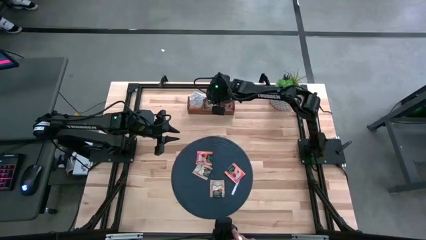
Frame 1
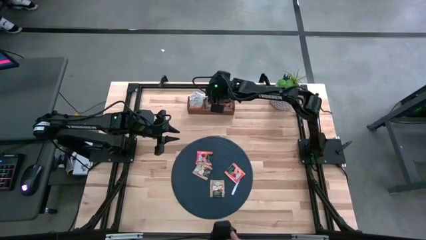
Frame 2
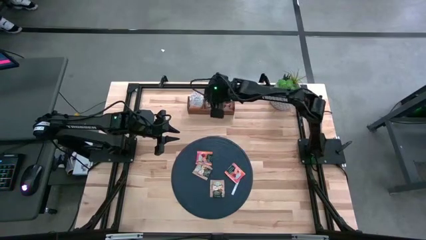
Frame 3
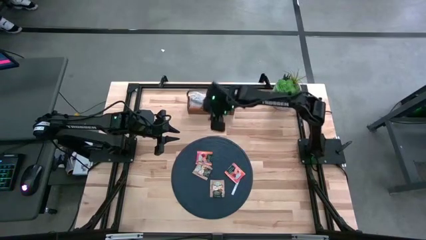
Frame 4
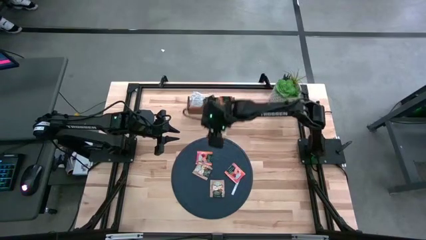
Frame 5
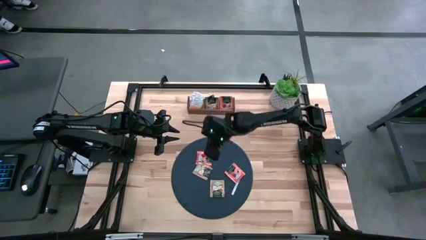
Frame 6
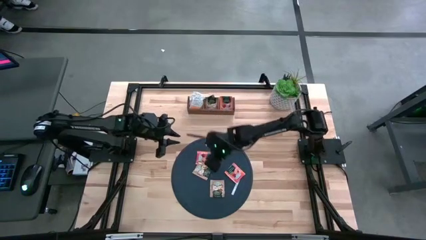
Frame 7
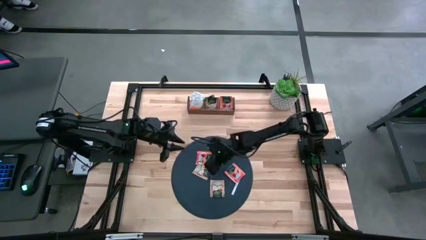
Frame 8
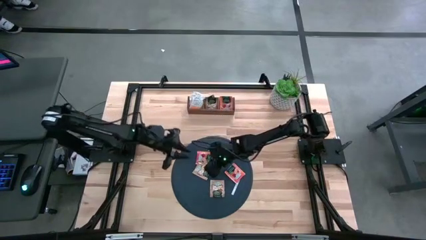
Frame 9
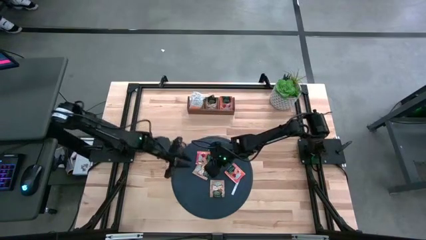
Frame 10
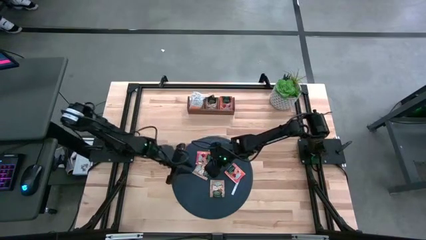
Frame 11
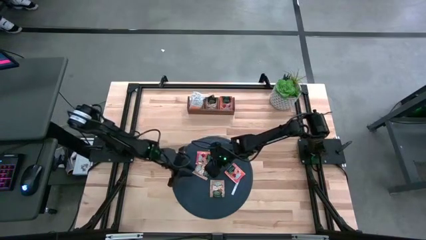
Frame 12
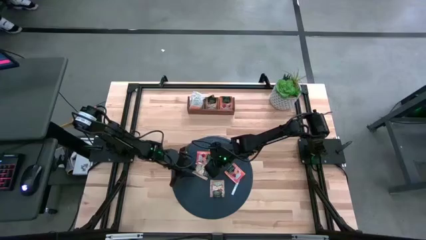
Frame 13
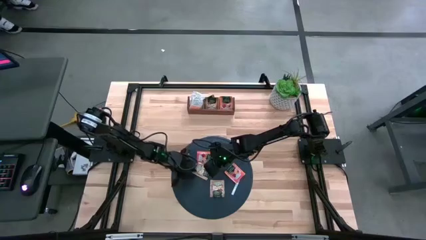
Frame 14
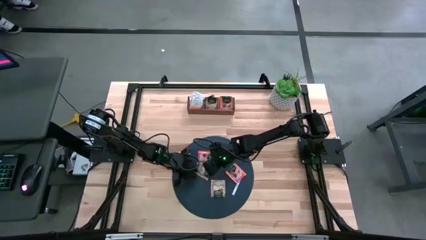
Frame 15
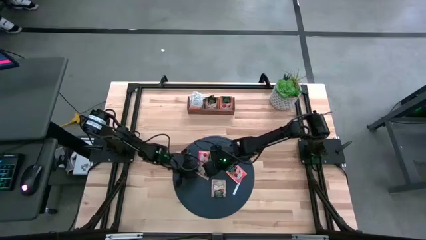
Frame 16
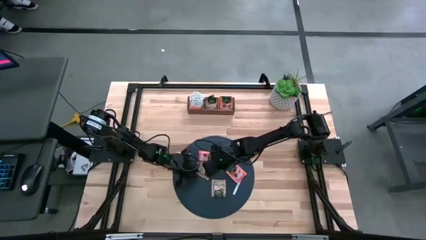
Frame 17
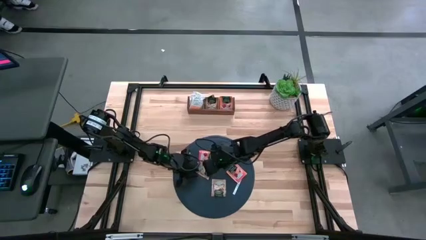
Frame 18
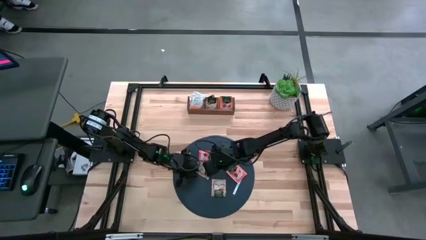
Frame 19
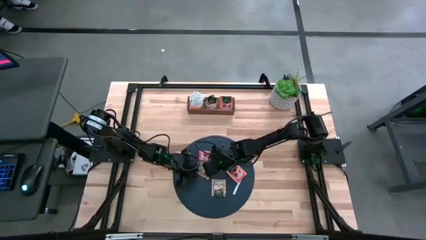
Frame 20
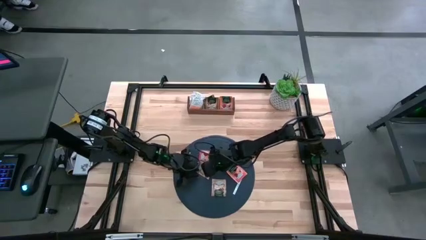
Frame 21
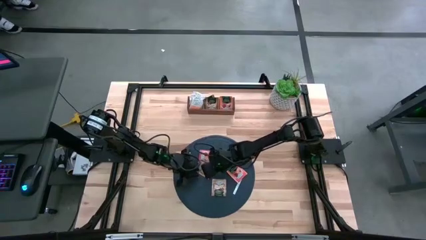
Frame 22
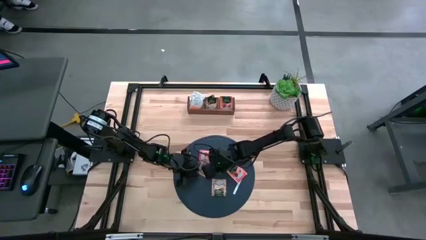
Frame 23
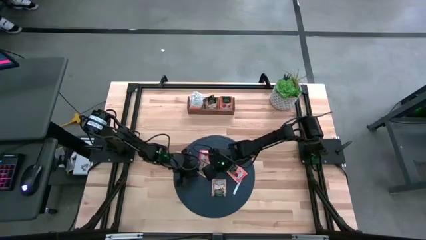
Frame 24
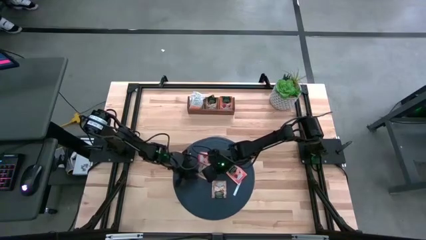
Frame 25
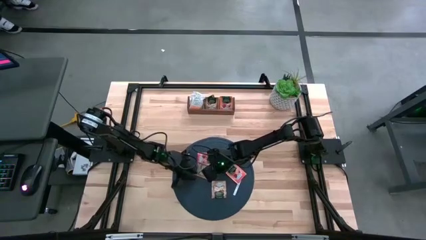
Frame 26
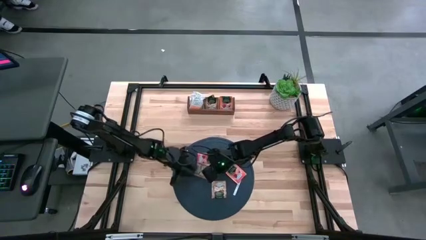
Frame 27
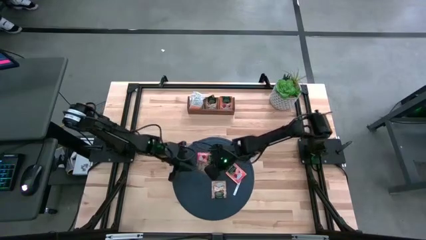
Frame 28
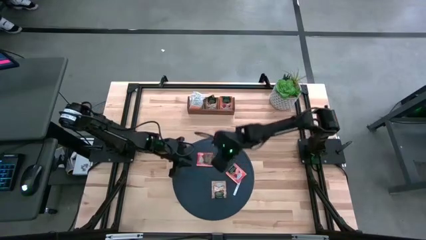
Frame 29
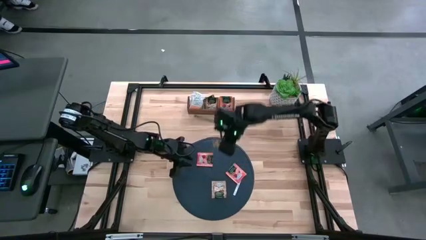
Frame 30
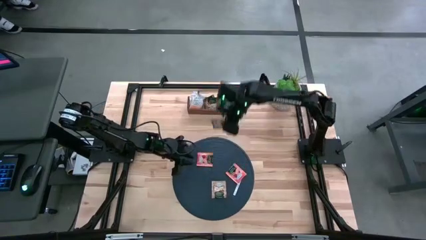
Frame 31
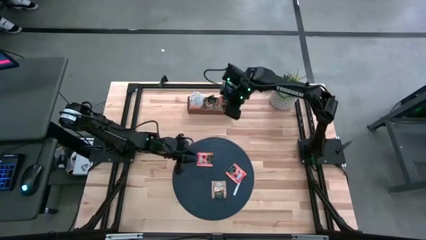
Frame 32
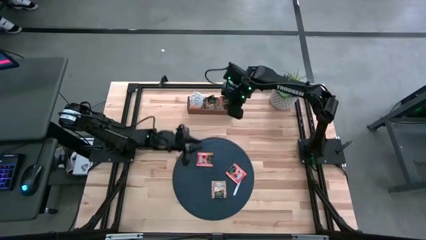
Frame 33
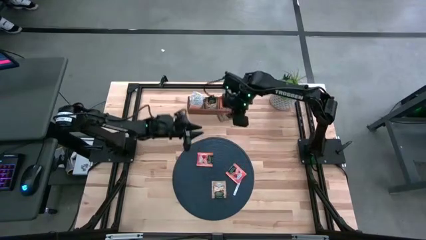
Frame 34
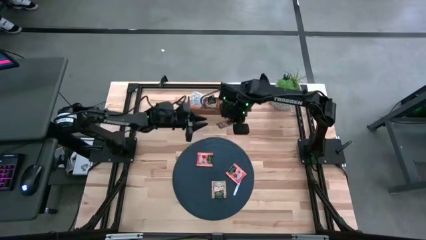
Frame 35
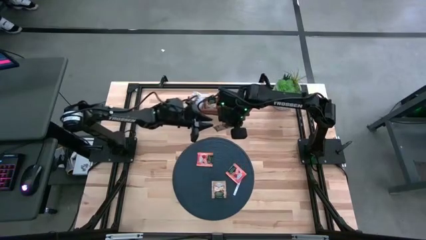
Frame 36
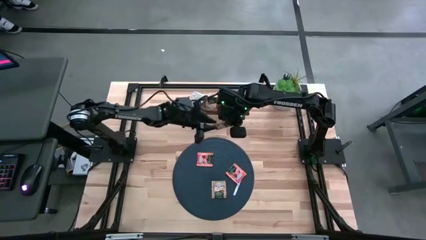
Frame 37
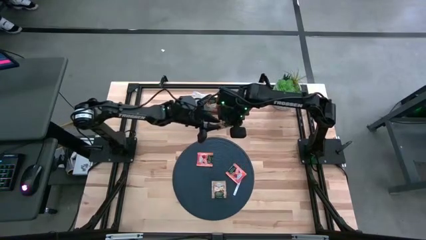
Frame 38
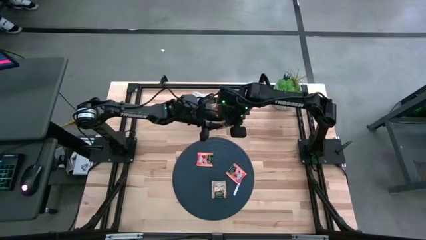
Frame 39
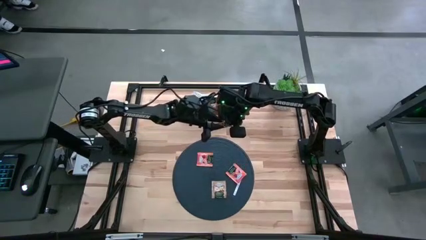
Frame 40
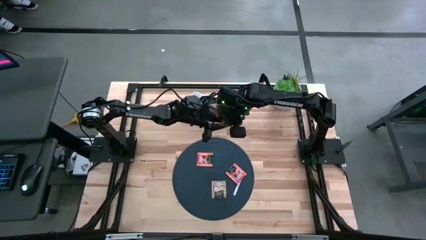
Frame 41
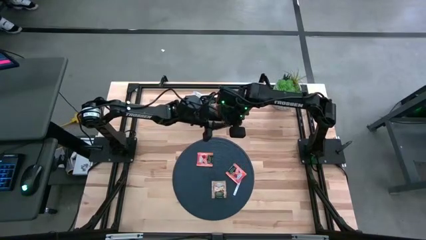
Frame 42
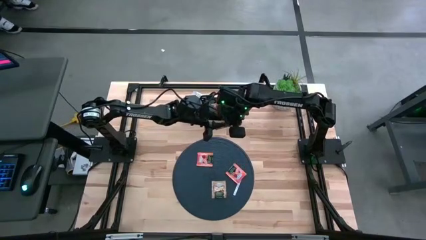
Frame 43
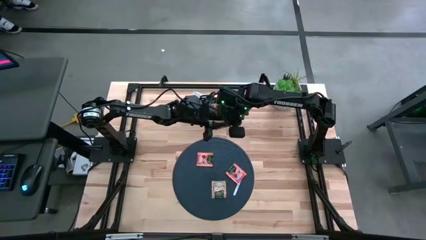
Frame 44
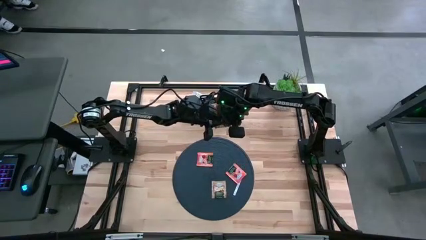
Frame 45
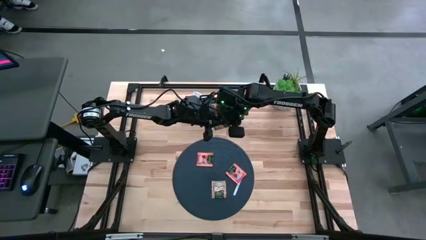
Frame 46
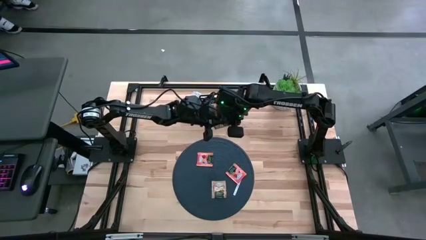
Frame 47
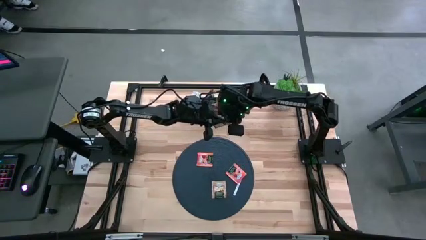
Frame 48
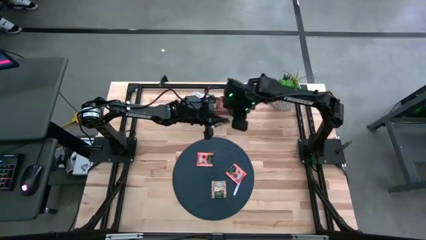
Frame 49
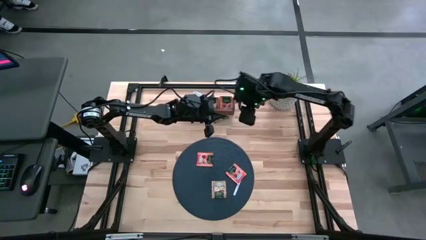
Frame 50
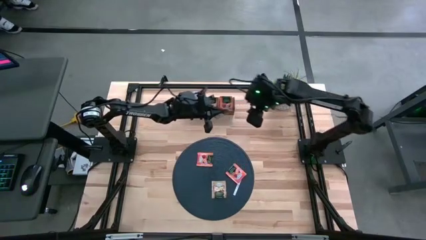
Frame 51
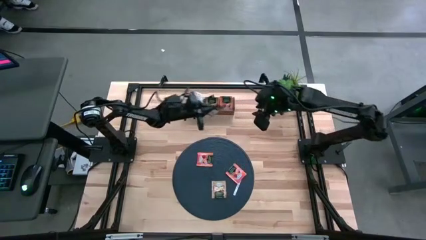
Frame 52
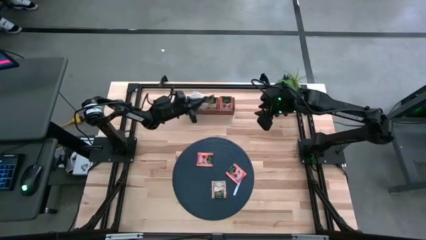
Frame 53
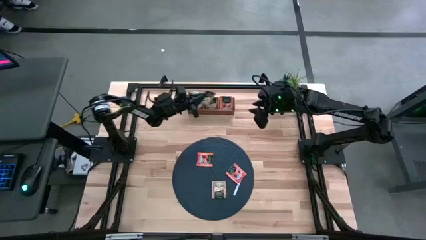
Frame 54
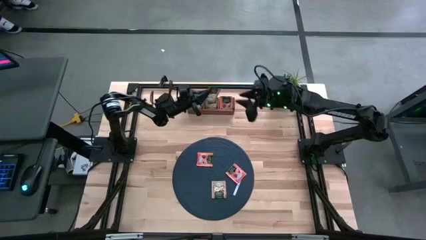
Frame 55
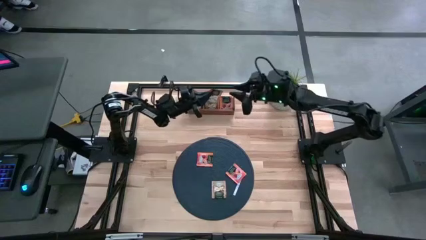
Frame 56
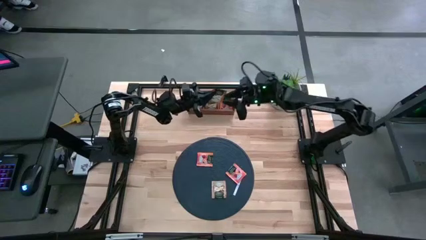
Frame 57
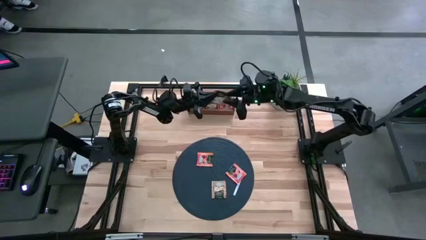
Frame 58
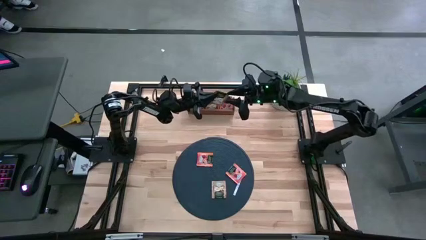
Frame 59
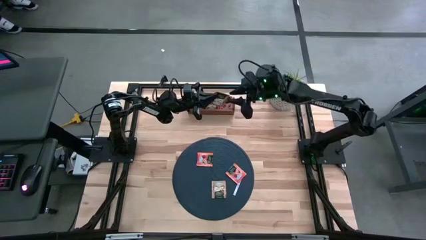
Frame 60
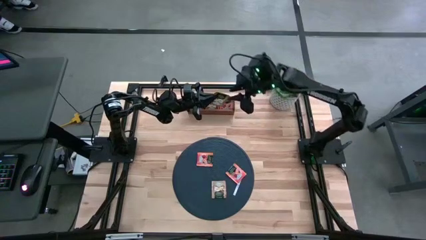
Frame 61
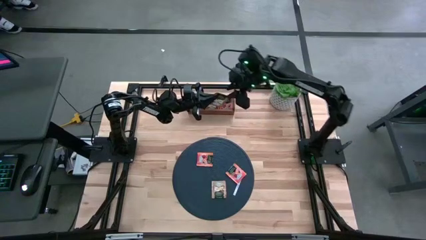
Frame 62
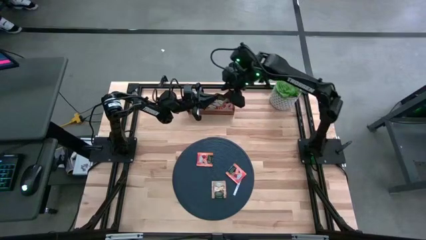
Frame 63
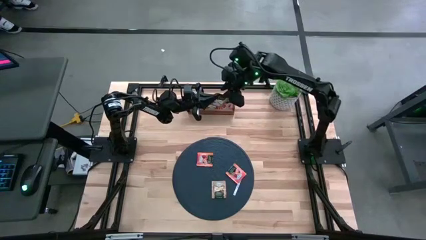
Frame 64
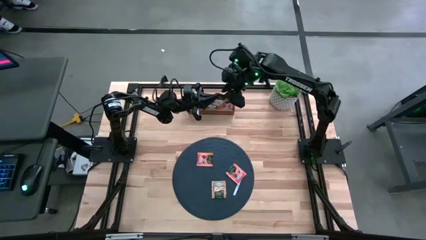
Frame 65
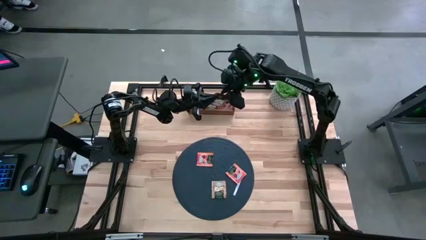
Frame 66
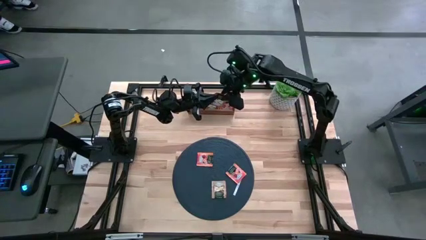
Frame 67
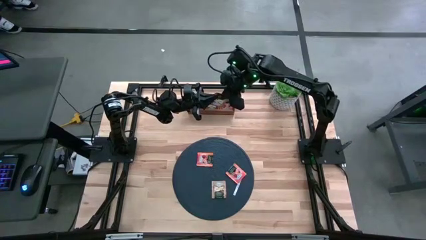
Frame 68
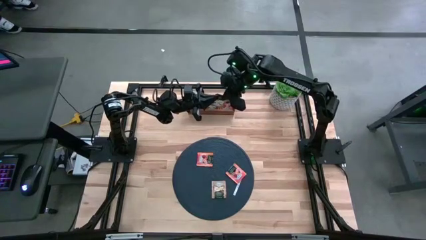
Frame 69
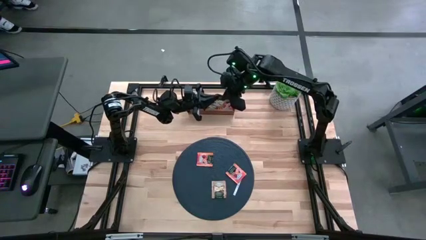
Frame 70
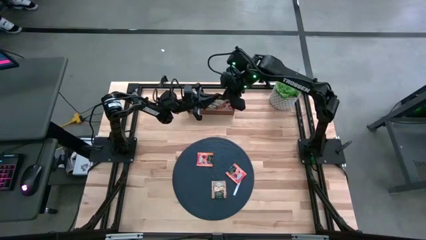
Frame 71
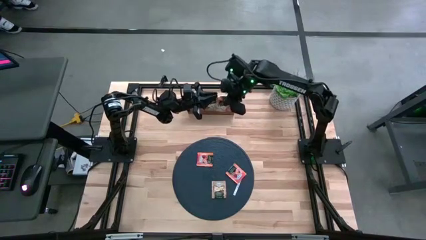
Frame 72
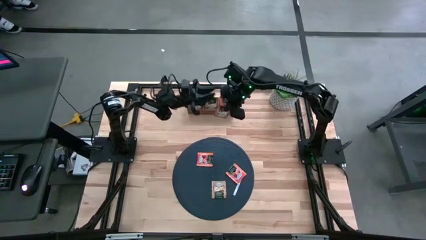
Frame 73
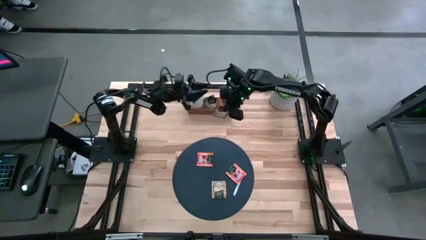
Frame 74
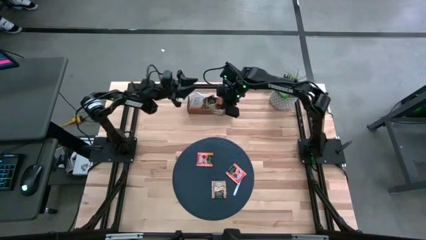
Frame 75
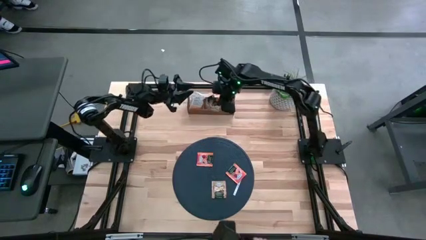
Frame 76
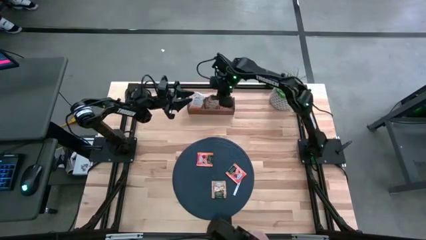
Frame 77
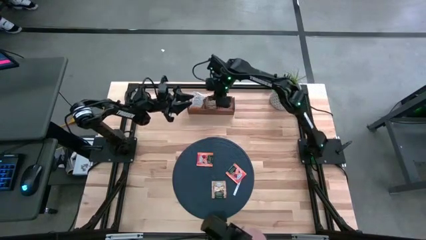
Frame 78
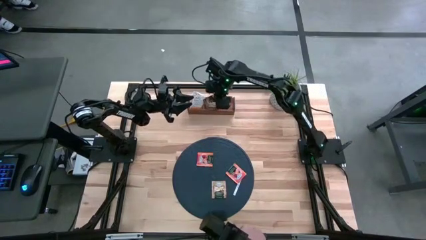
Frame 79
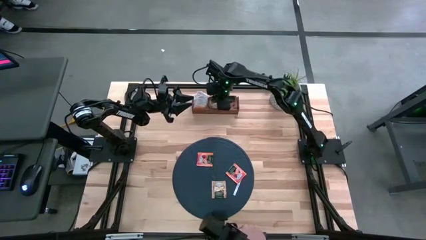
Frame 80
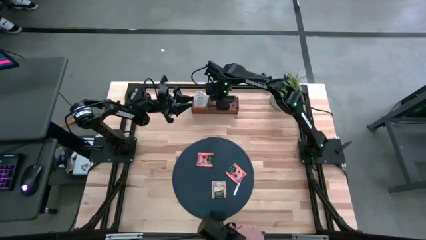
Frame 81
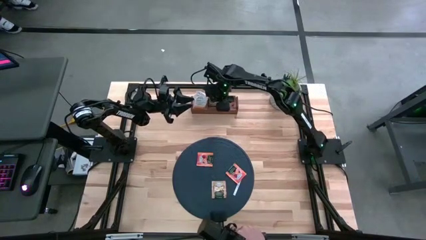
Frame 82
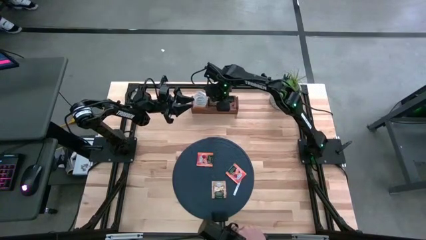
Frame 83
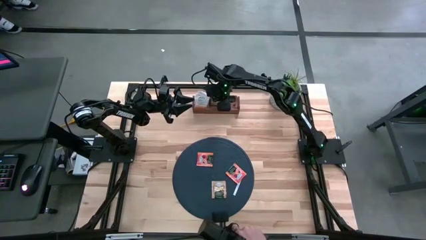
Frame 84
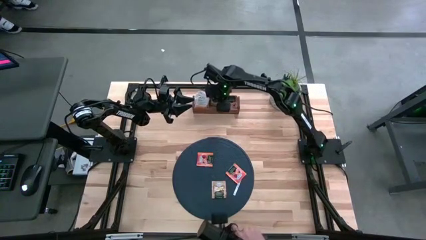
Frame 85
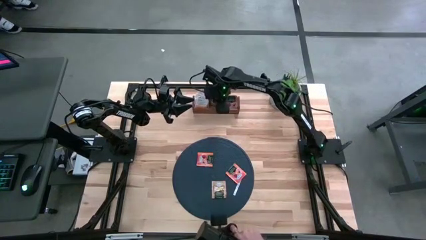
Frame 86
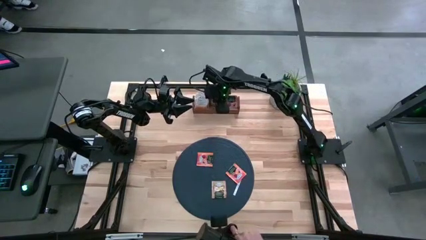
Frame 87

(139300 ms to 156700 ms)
Task: Pick & Place Tea
Put the brown tea bag into the middle section of the wooden organizer
